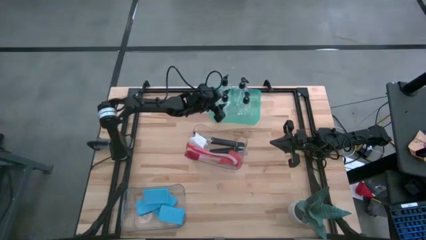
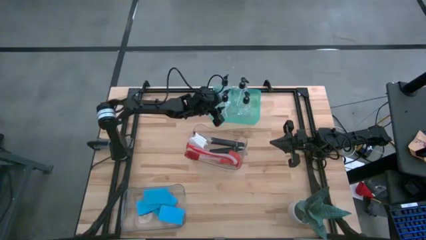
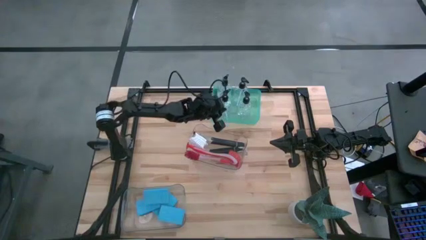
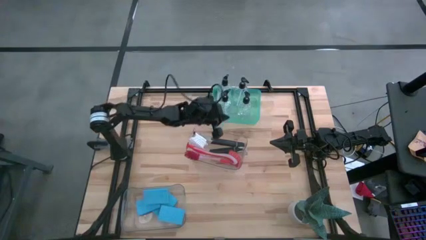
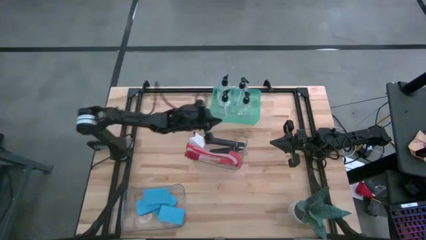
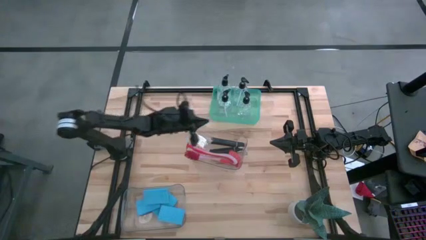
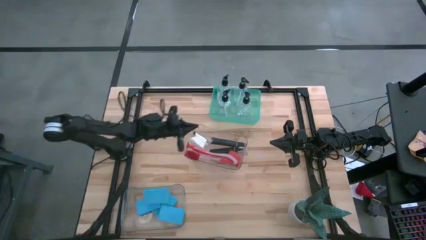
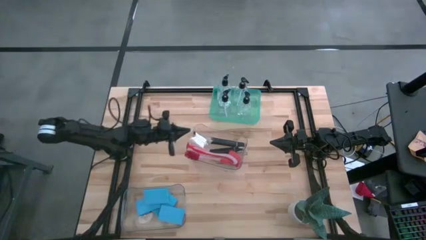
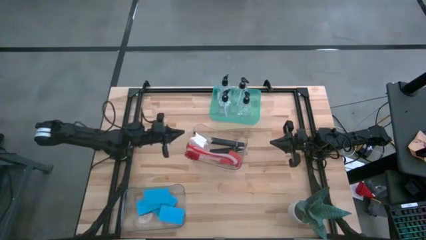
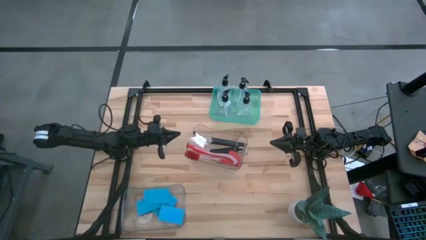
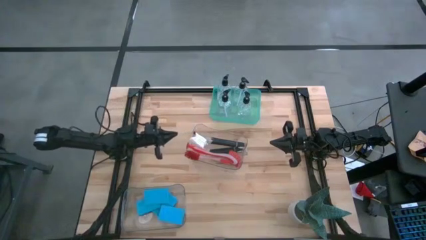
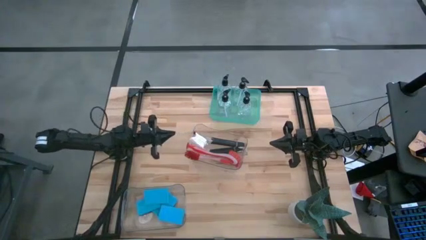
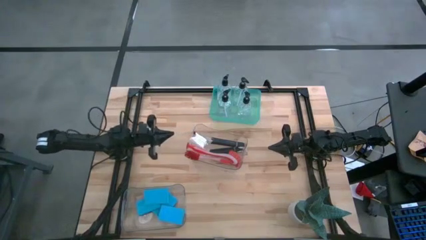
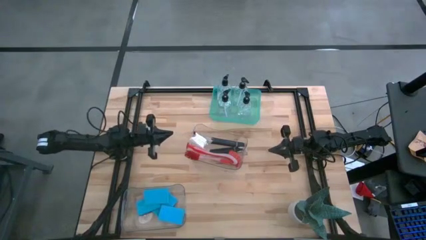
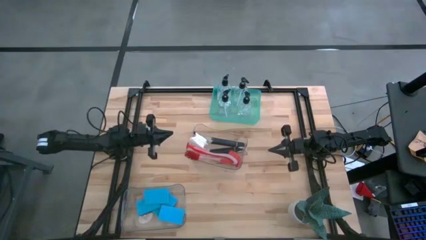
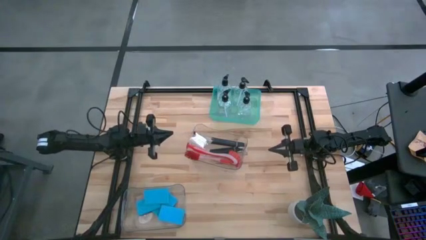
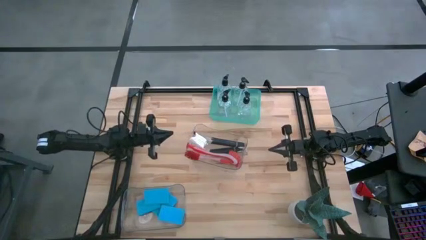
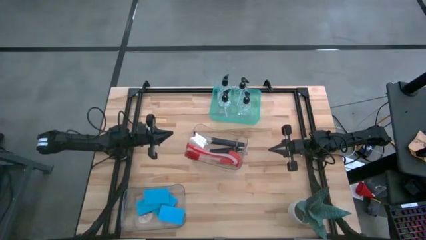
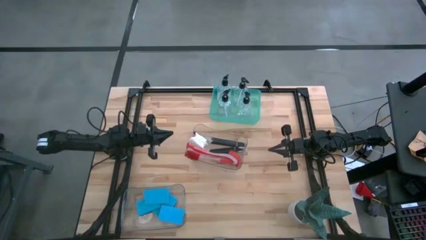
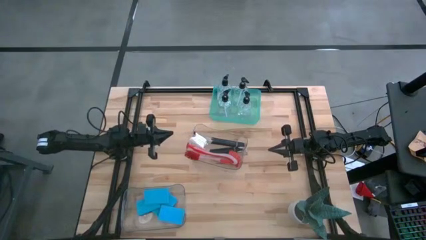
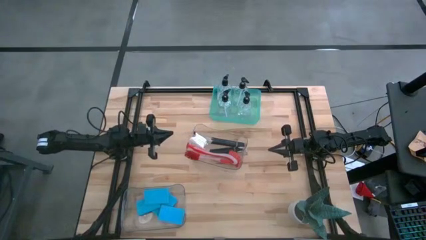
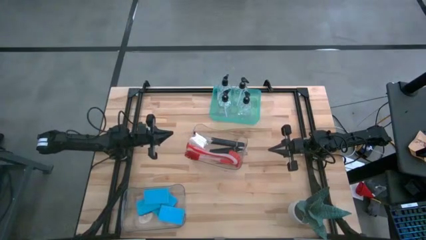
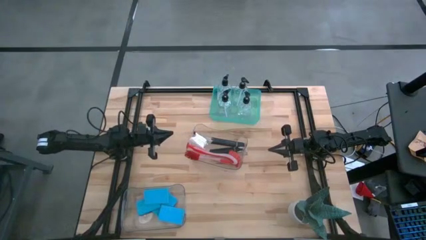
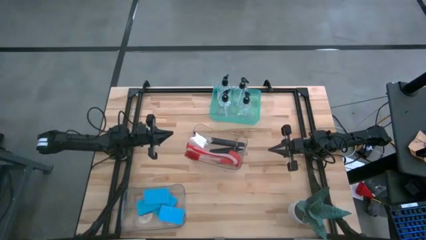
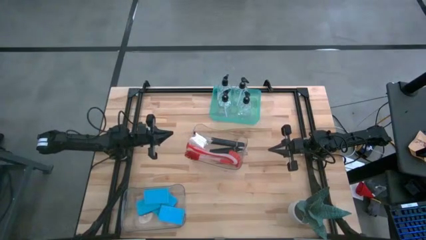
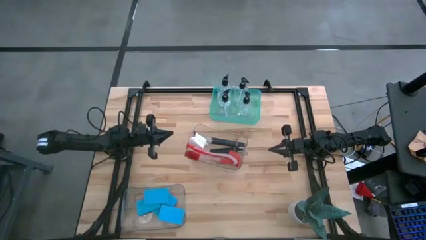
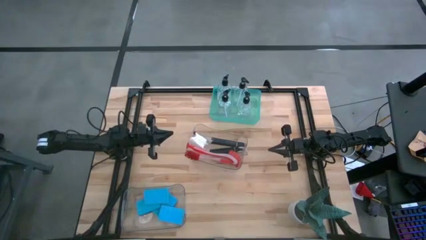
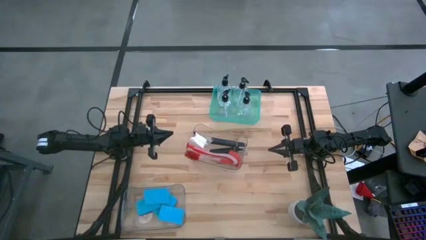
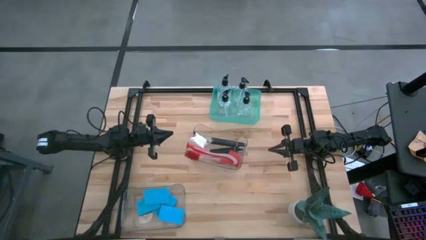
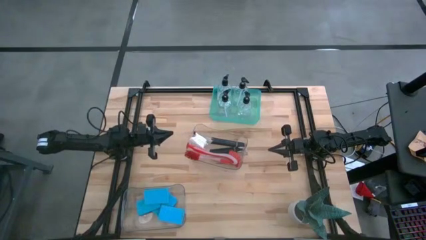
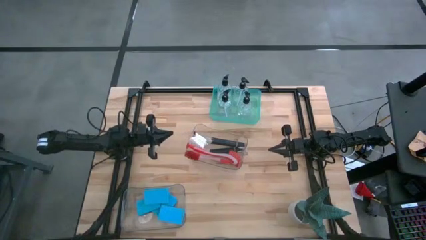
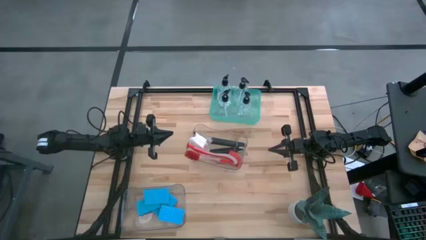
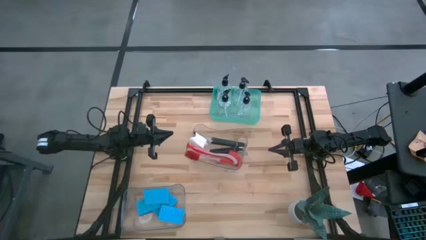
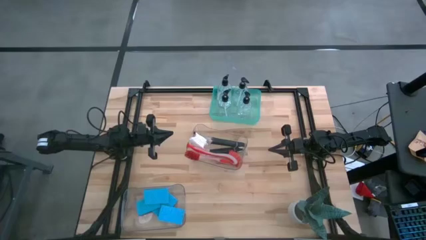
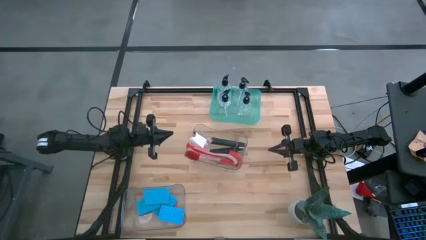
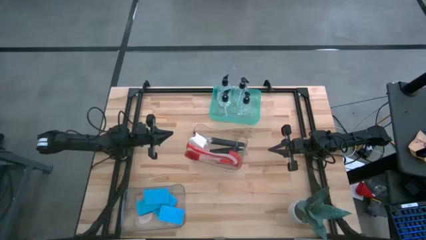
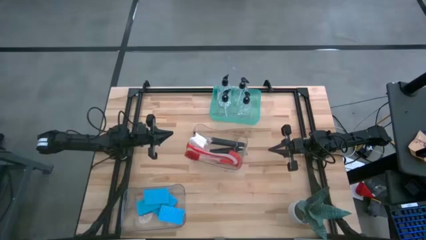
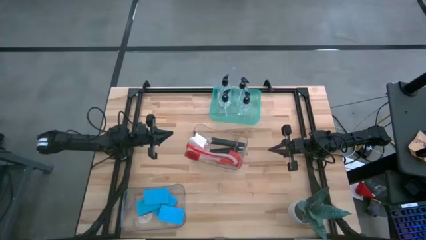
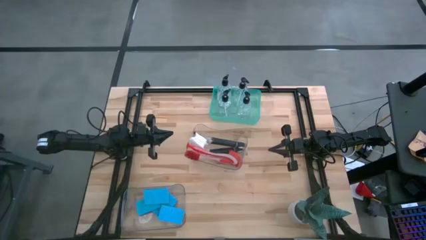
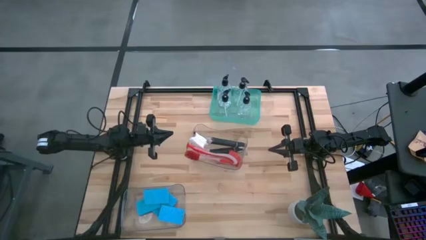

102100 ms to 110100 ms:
Task: Pick & Place Kitchen Sink Supplies
Return to Home Position

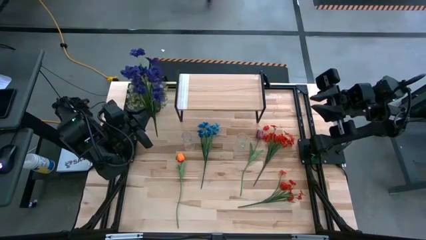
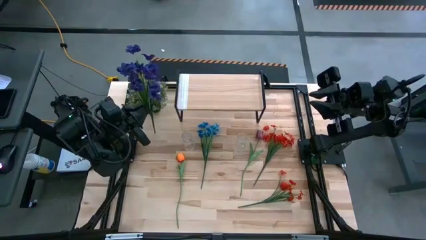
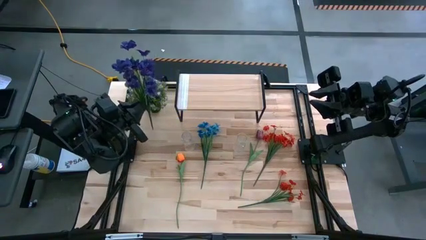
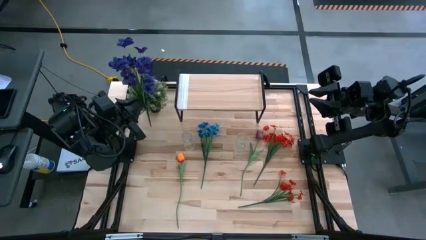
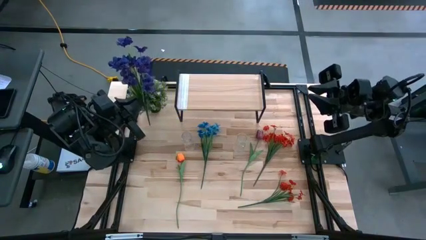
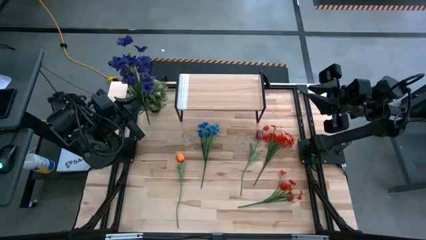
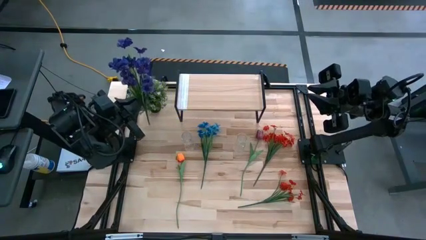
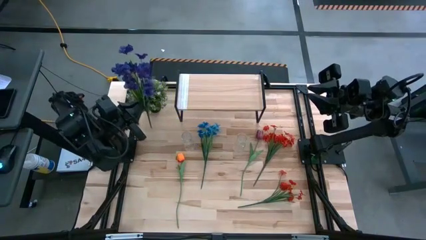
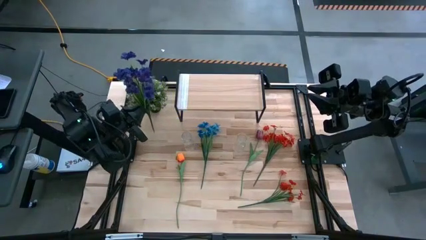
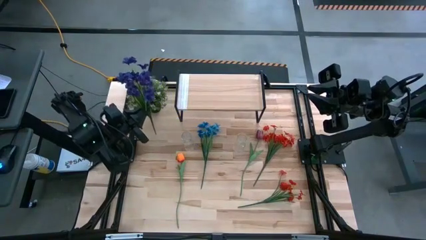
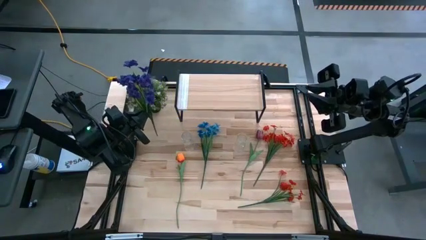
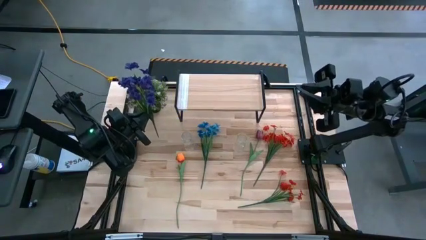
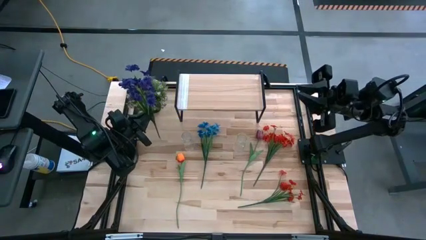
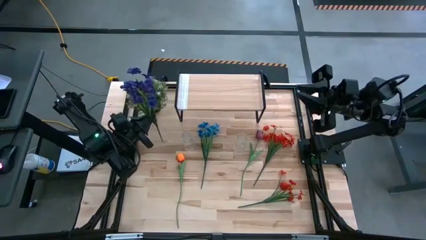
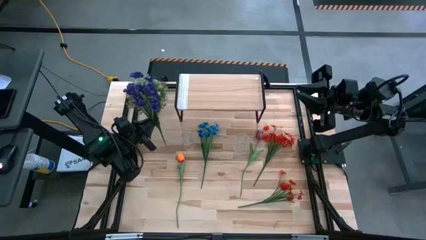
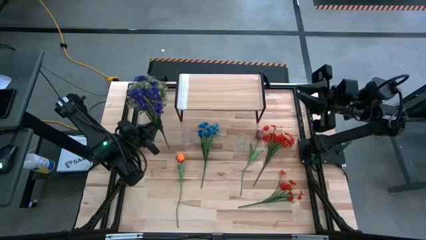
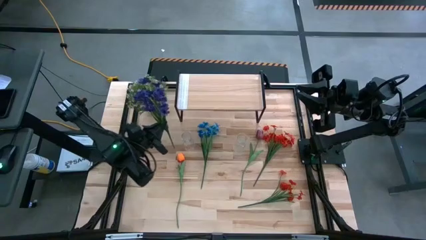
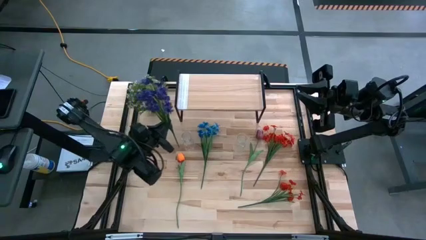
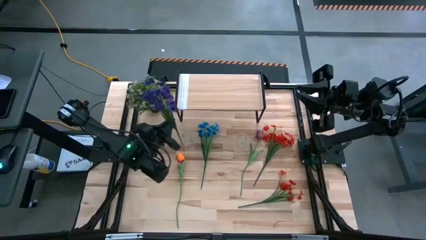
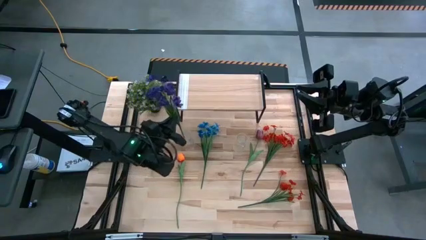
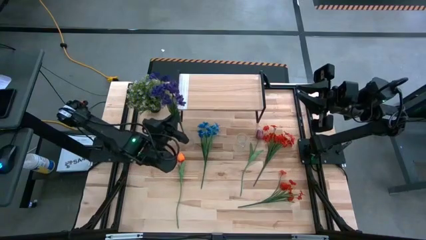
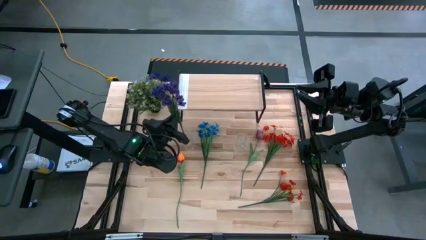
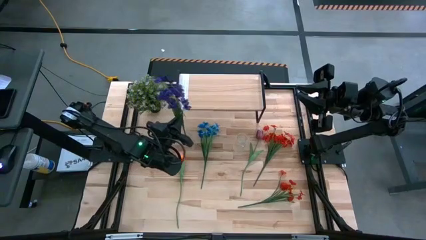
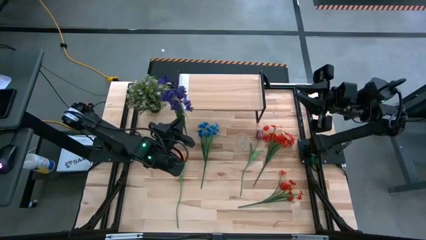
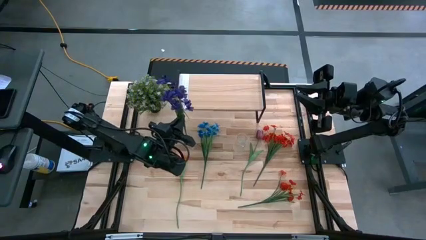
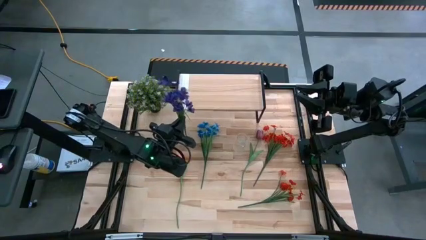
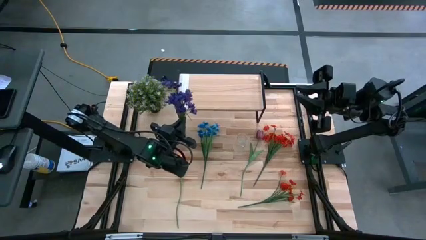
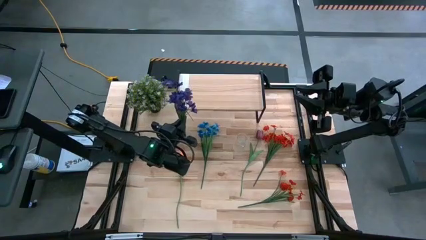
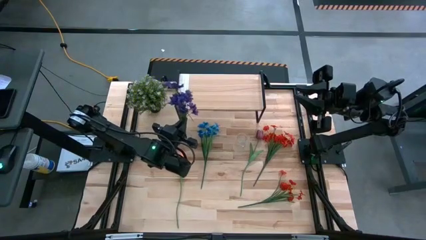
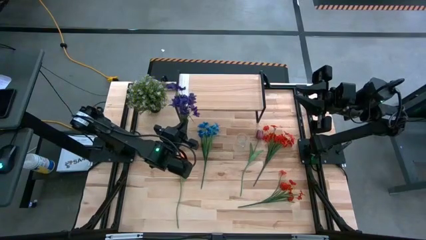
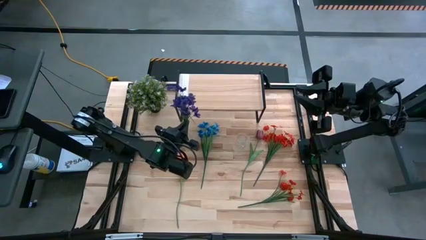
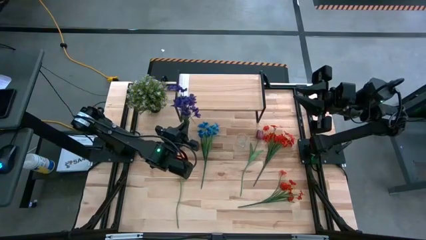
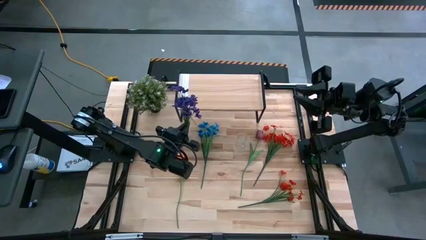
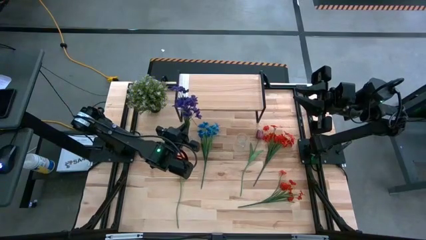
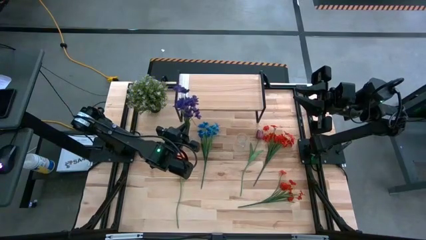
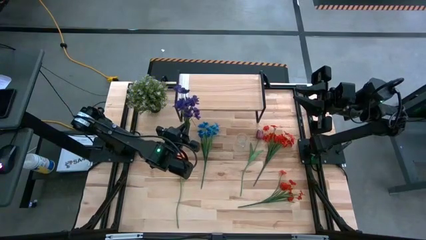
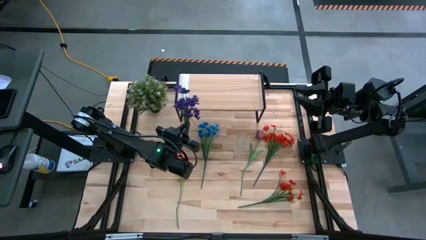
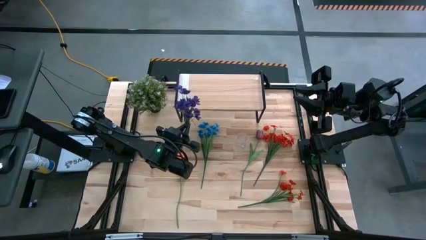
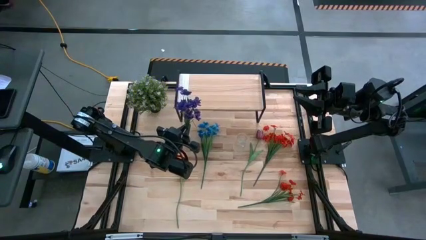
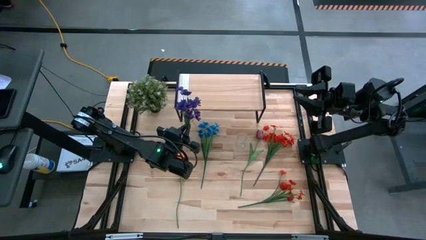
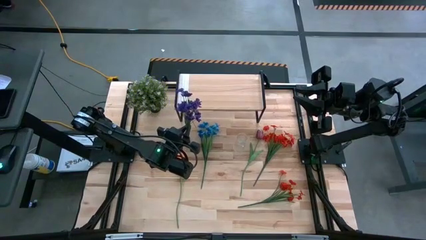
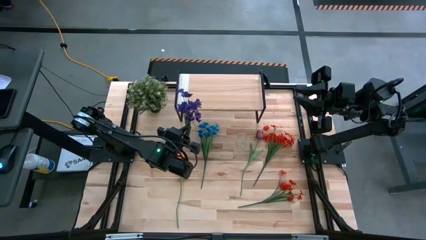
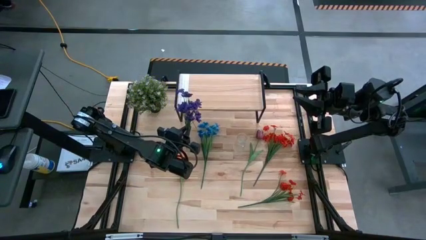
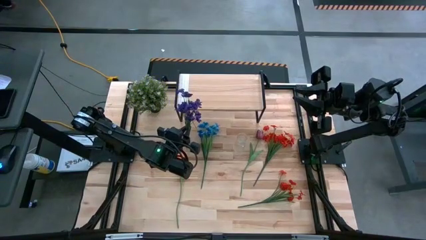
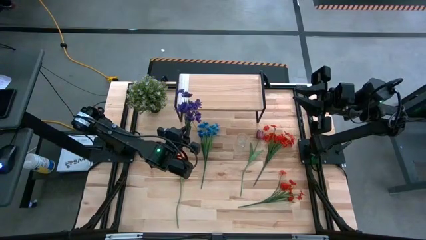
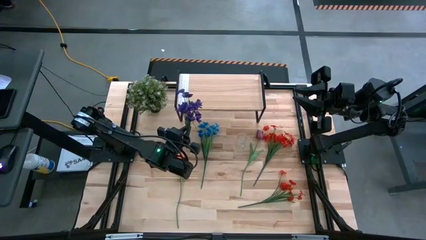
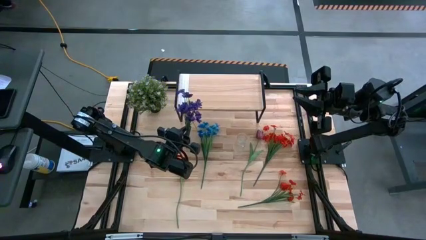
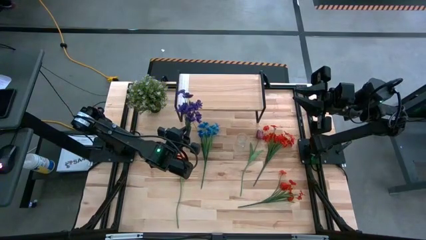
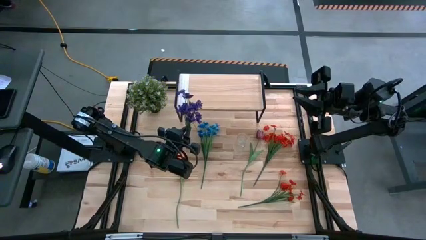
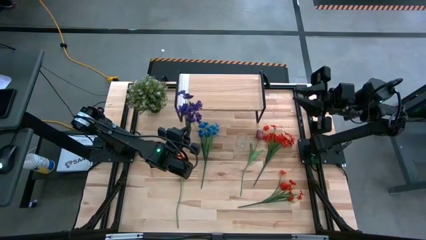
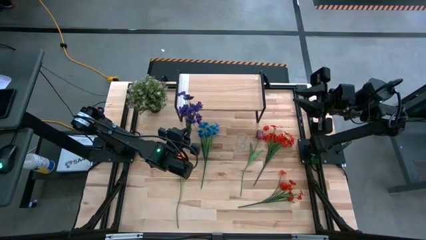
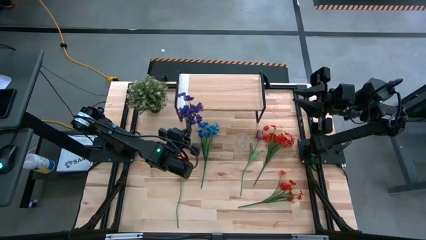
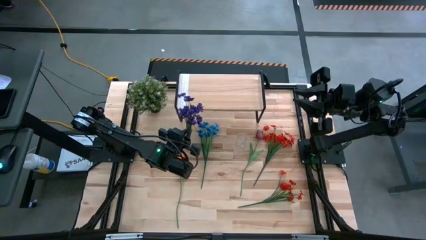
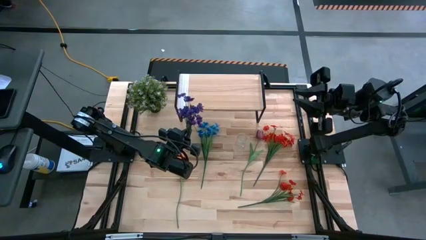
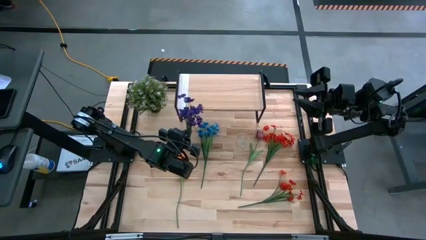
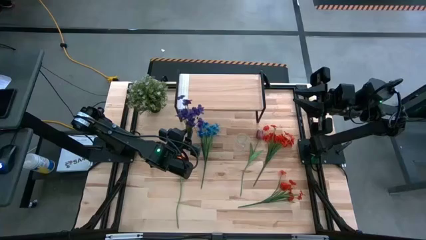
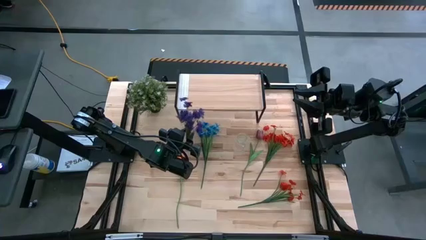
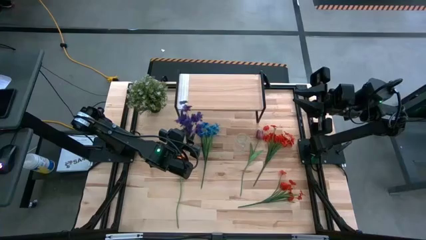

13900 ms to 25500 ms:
Task: Pick and place flowers into a vace then onto a shelf
Put the violet flowers into the left transparent vase
